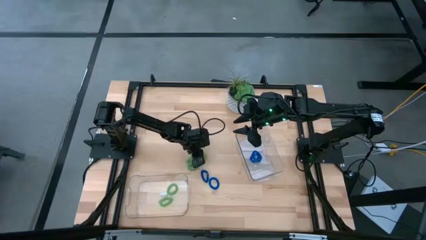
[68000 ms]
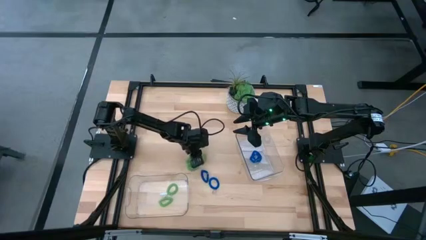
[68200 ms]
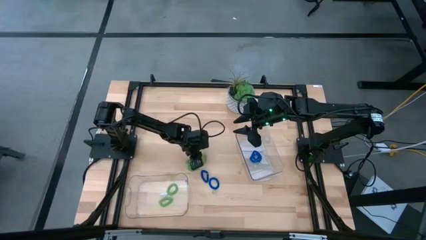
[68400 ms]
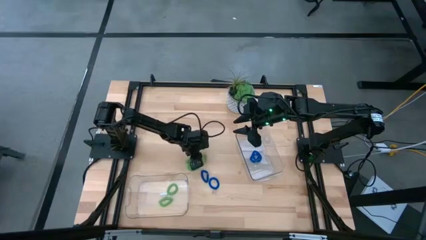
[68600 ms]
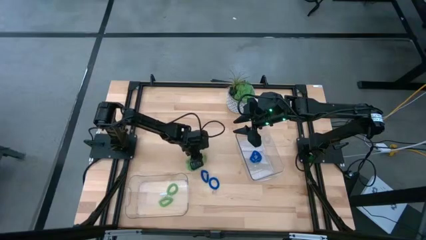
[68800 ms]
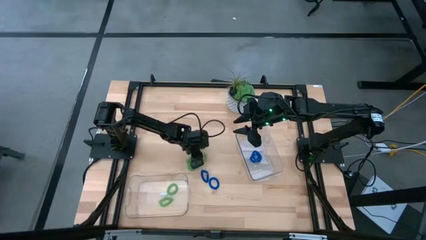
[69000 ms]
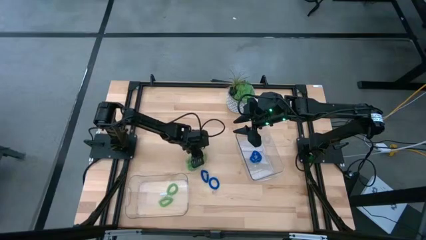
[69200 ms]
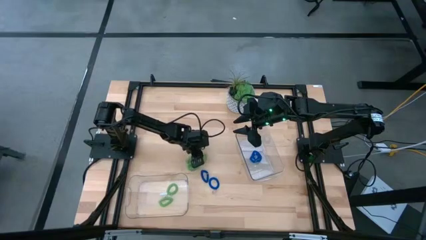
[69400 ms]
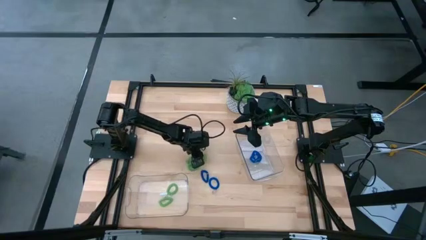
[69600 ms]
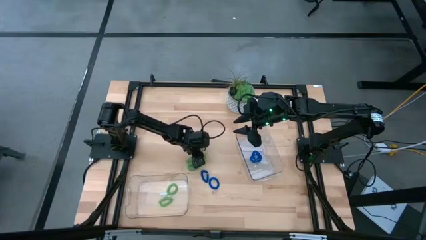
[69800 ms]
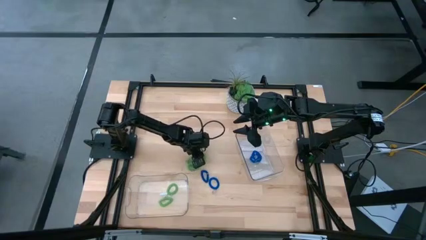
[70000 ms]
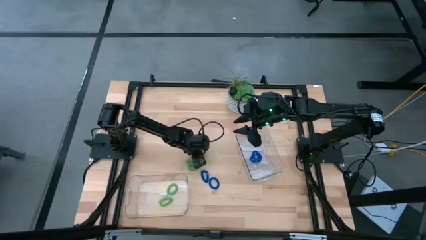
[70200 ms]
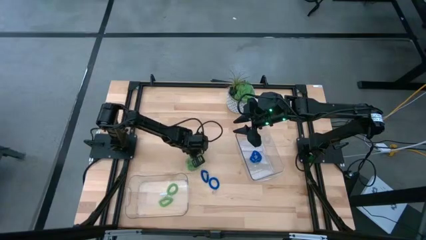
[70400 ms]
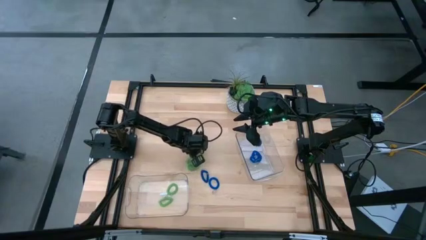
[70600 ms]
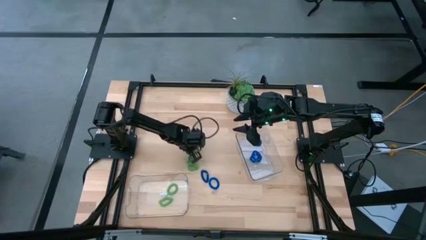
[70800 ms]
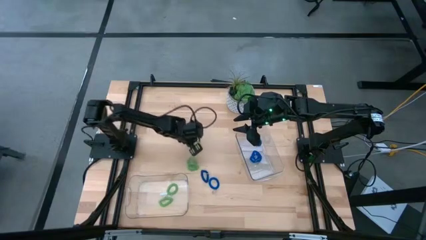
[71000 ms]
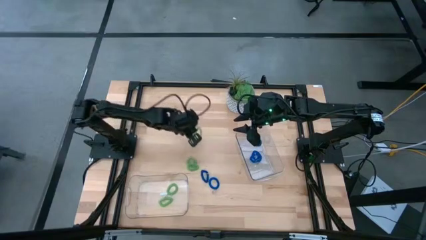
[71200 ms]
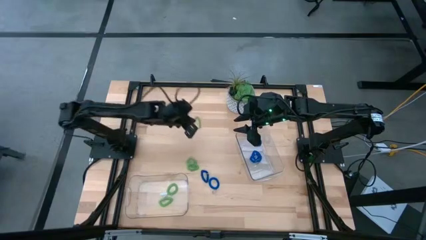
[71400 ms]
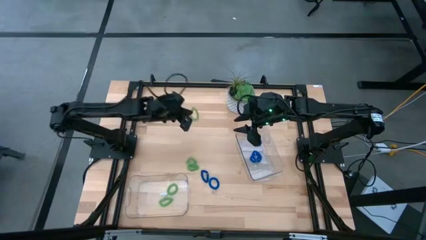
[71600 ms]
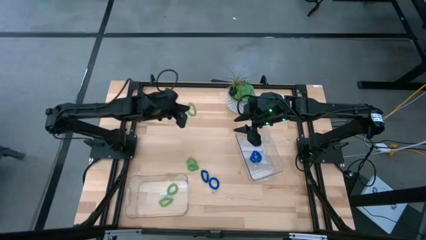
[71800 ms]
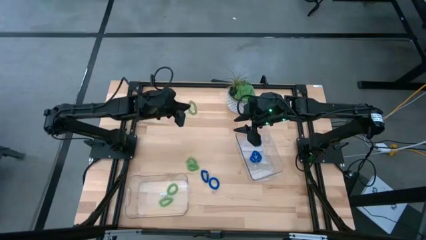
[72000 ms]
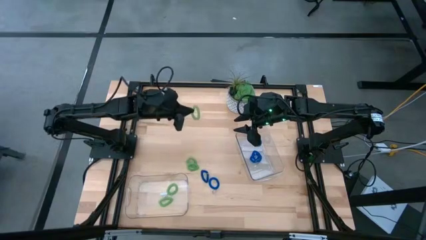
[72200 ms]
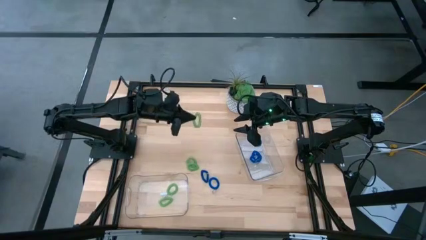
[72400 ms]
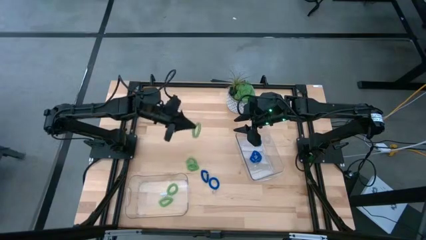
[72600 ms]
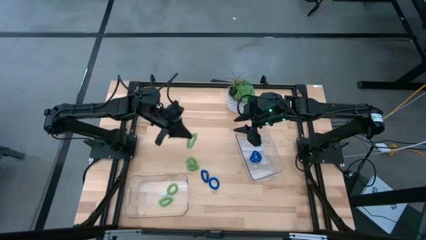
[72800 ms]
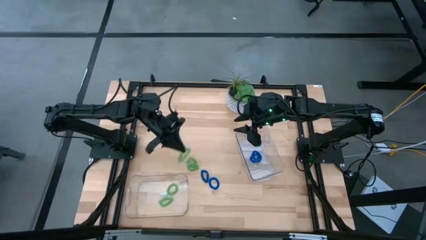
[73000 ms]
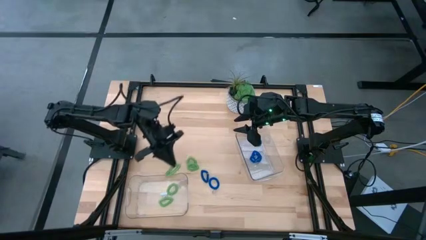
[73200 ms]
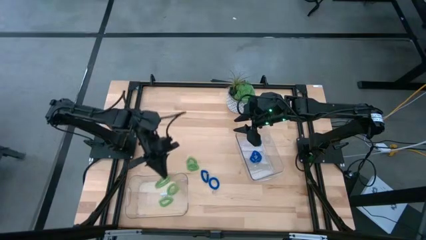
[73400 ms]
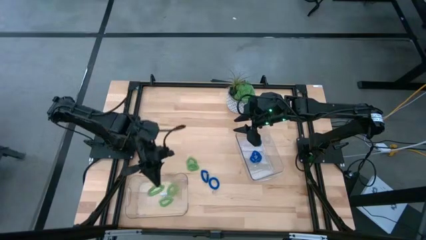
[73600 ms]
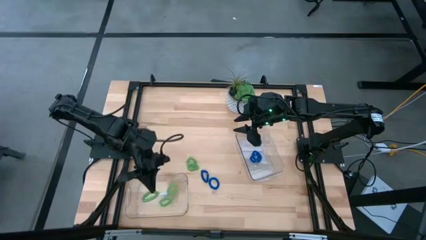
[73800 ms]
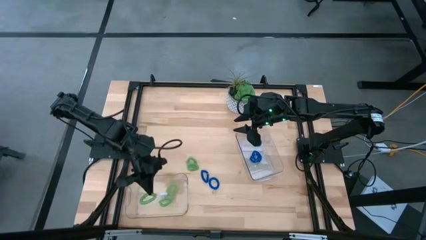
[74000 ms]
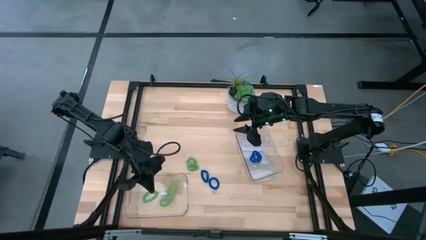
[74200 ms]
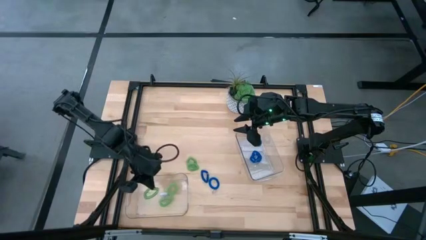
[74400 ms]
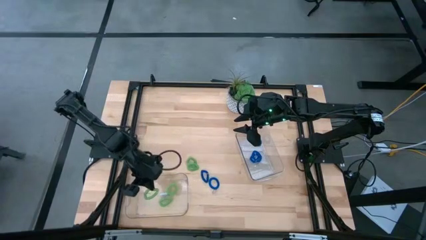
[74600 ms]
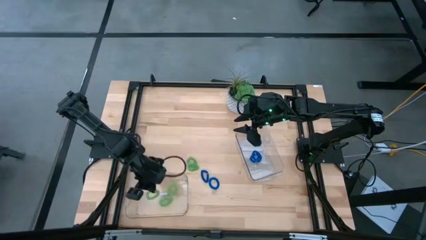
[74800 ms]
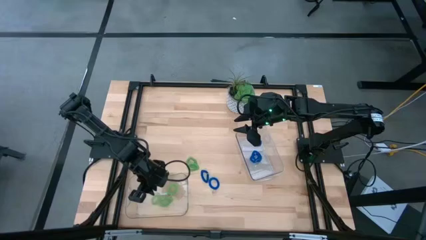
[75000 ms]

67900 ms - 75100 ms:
Task: Sort spring keychains
Put the green spring keychain into the left transparent bin

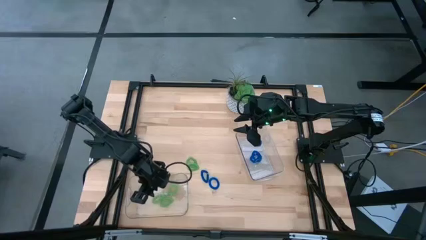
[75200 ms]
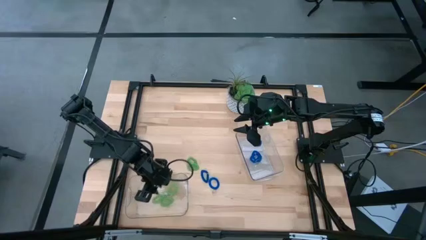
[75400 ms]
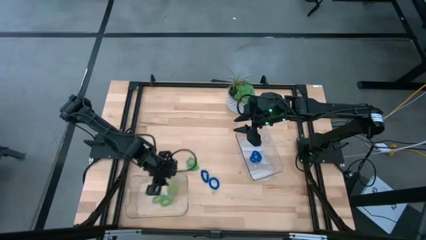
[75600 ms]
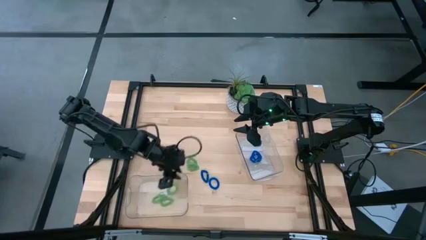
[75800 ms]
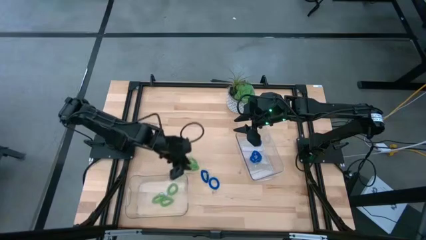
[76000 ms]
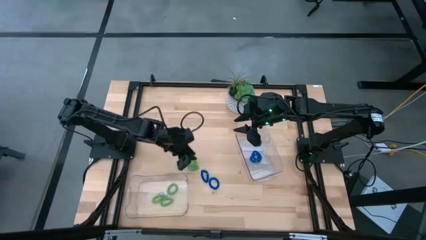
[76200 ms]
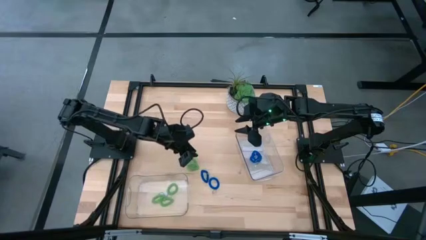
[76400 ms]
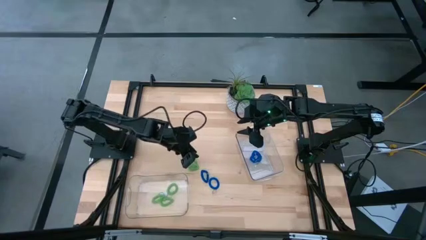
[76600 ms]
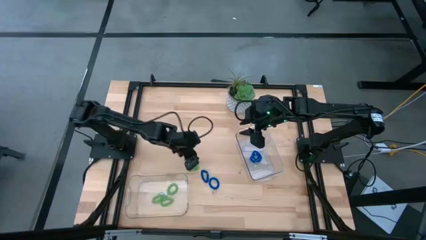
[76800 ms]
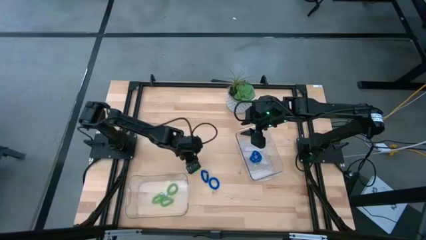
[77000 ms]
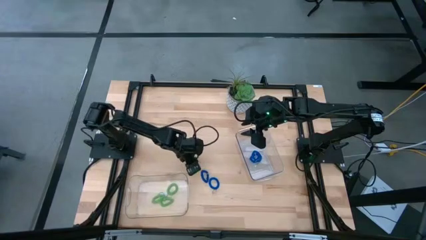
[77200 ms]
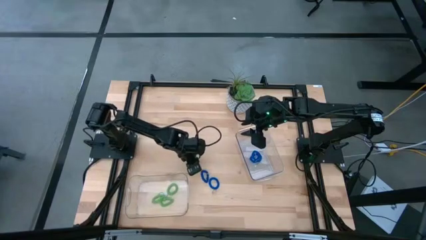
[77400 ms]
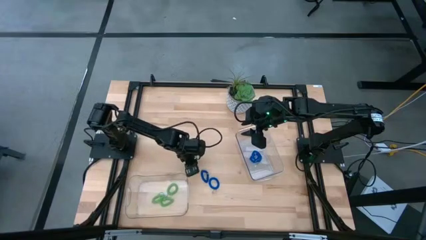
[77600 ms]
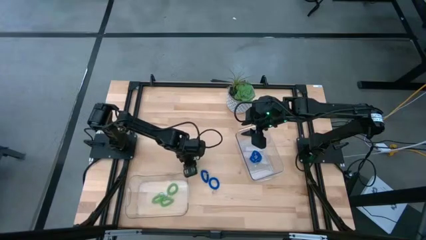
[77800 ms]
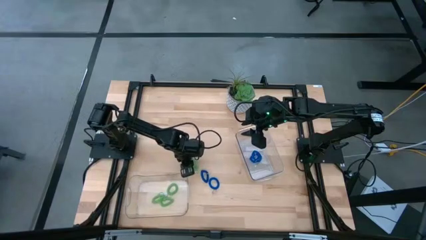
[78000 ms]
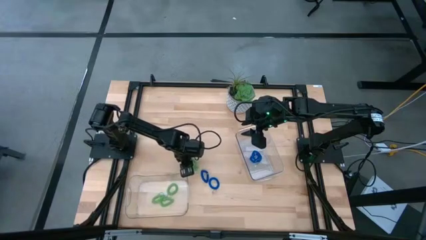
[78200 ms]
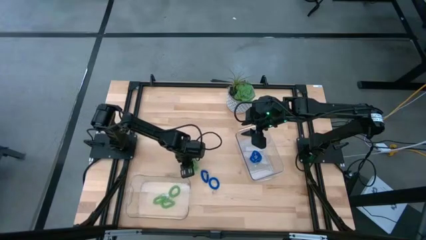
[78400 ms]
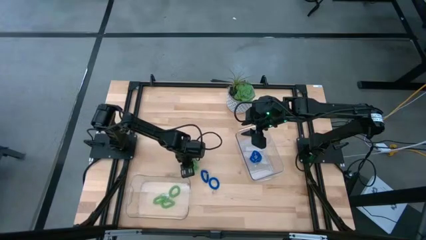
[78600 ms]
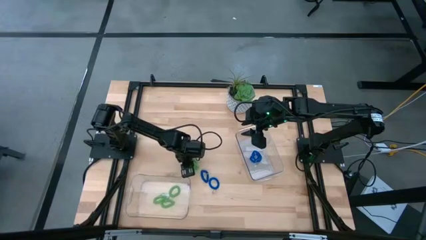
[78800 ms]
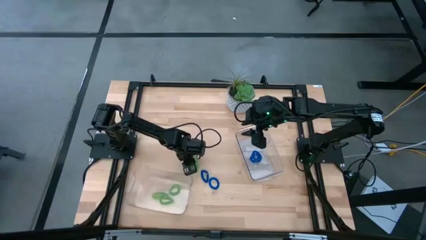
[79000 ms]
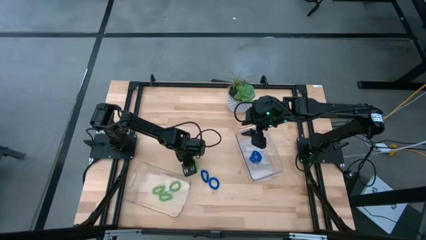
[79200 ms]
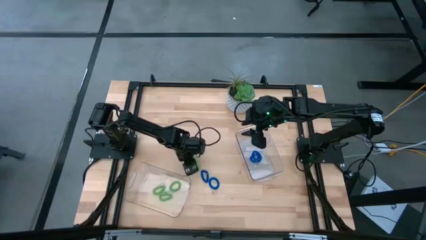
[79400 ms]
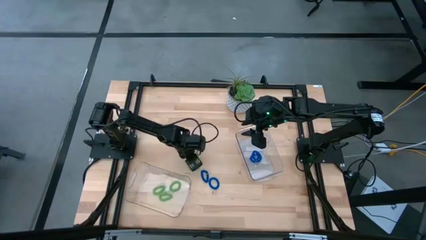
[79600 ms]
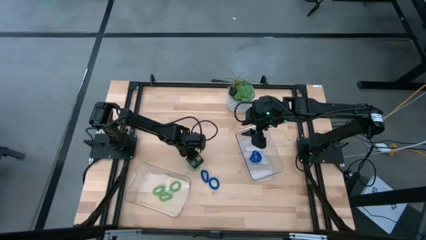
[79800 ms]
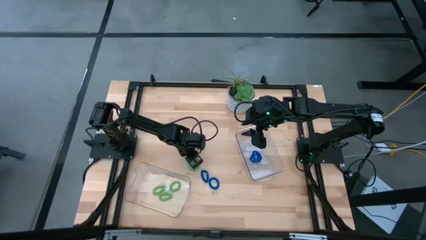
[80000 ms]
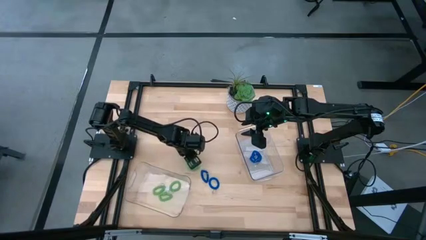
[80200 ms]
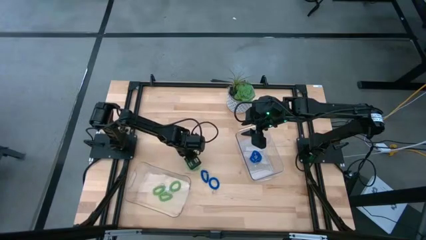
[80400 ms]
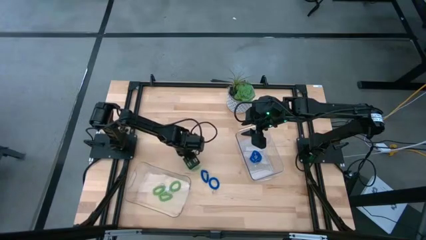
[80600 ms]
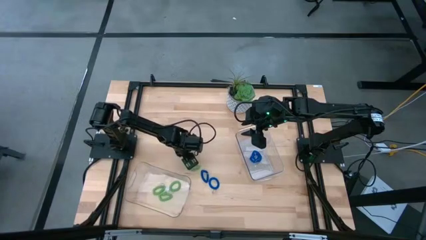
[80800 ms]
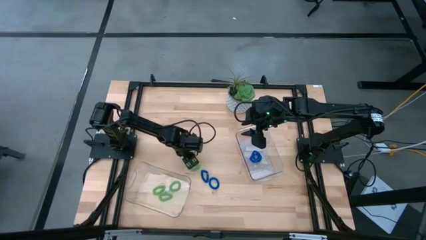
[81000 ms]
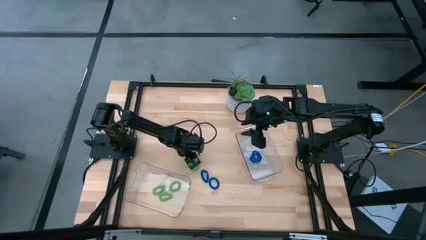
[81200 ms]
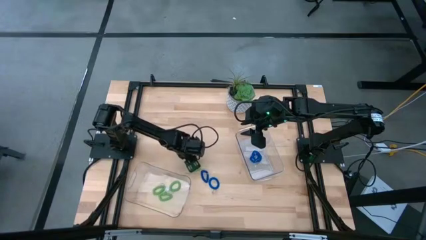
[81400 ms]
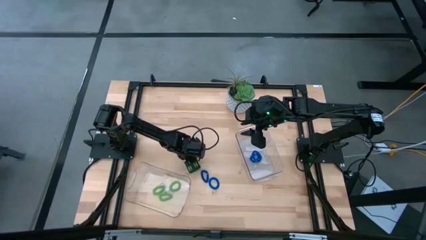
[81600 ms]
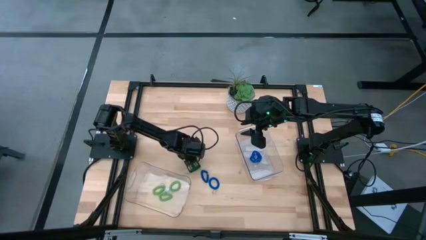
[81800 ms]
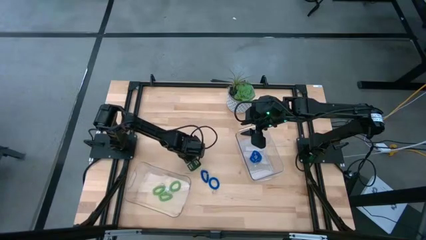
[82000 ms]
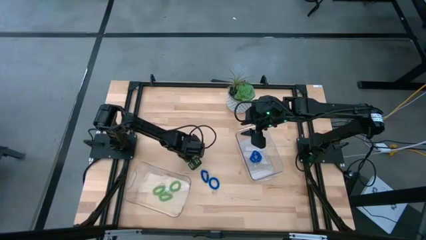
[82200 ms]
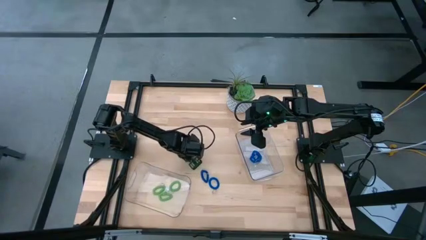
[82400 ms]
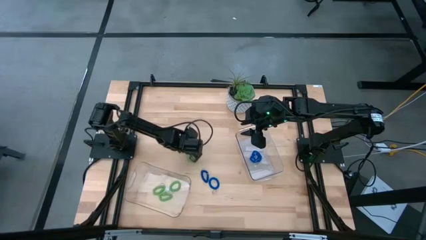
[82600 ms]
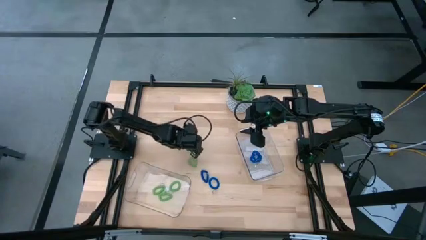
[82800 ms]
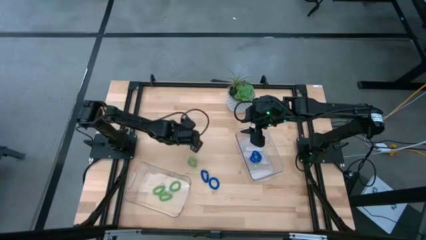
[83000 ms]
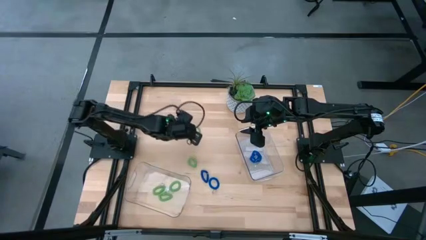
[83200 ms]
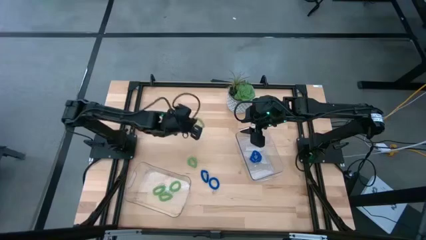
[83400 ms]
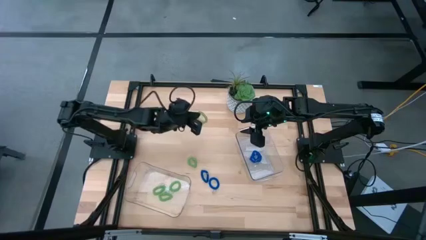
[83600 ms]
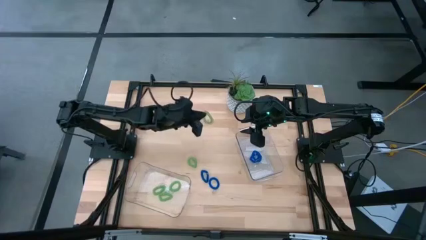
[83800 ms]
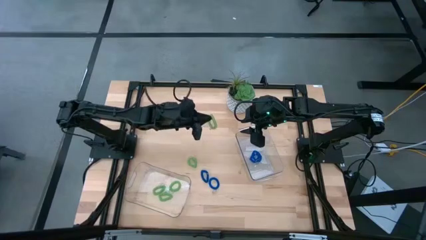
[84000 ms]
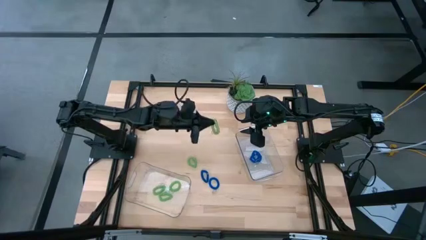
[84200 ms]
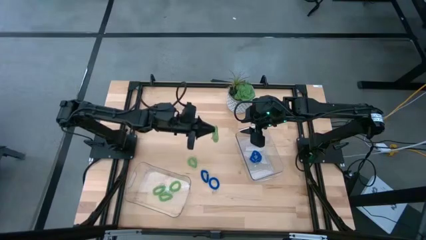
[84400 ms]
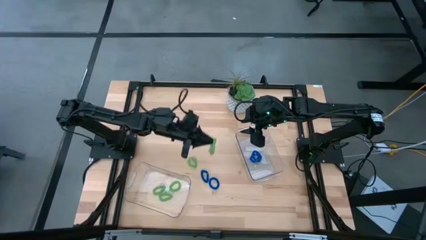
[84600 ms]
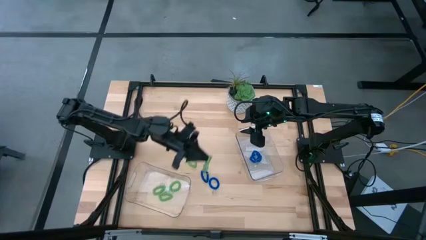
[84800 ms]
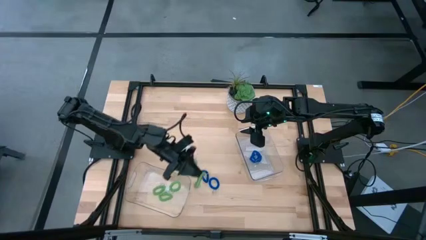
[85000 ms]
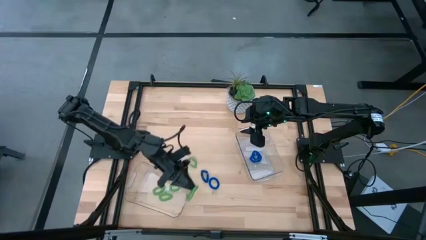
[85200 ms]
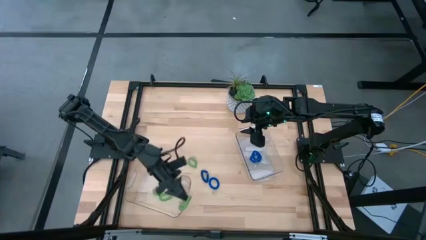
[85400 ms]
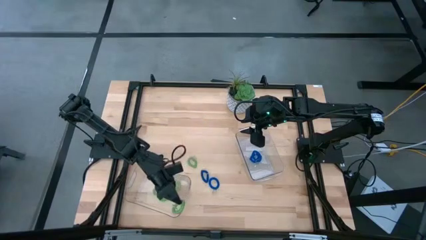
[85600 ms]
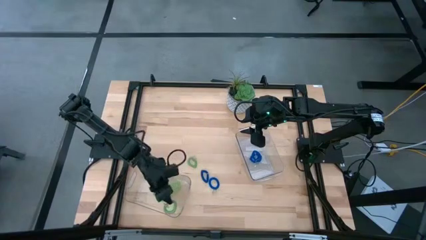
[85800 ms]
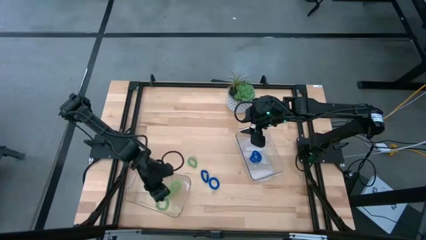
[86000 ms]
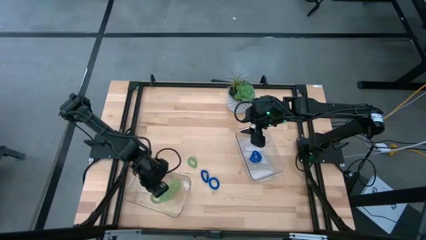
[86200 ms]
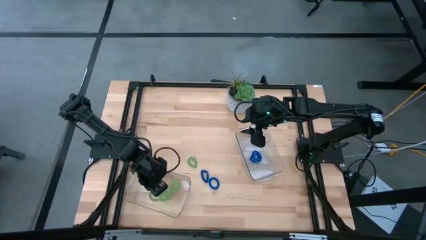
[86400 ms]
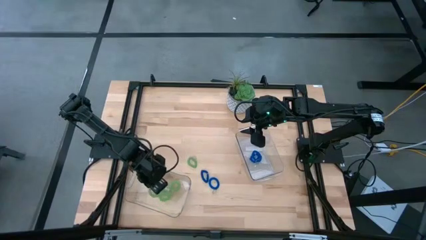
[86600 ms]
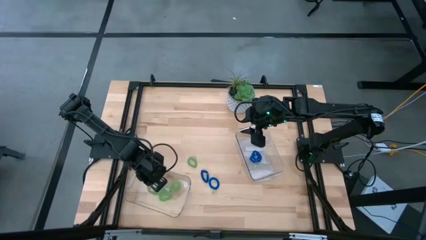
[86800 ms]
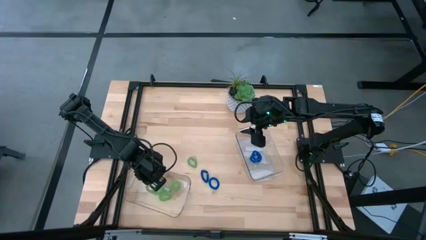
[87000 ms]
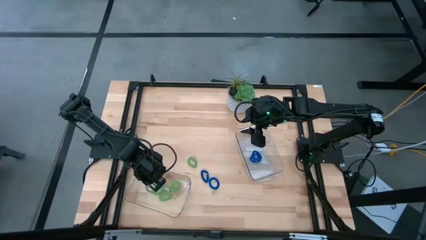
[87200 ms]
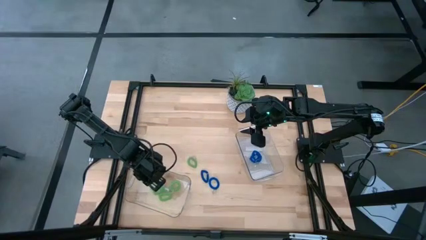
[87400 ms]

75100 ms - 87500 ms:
Put the green spring keychain into the left transparent bin
